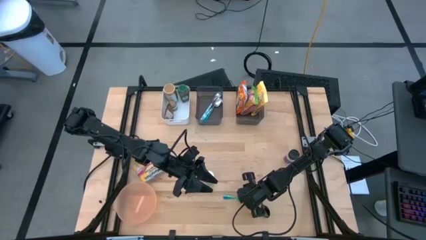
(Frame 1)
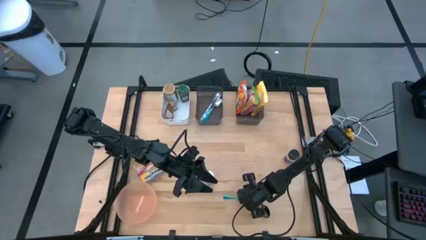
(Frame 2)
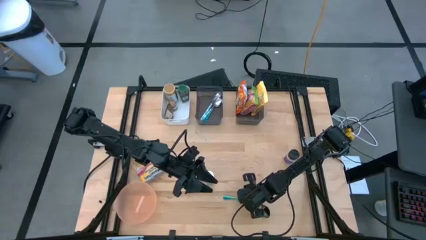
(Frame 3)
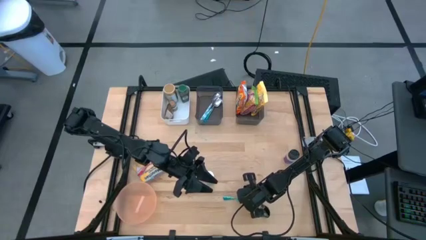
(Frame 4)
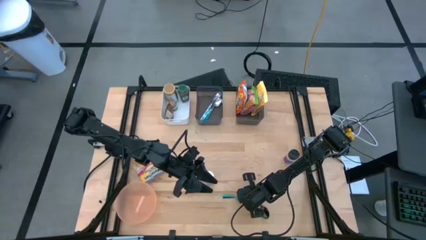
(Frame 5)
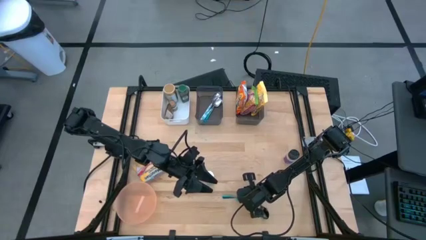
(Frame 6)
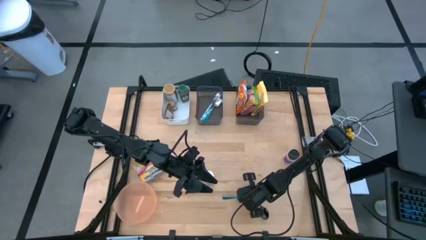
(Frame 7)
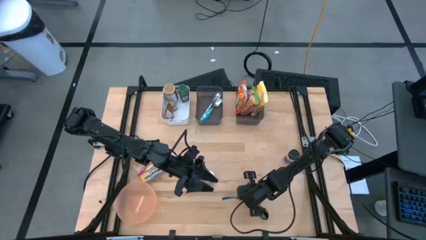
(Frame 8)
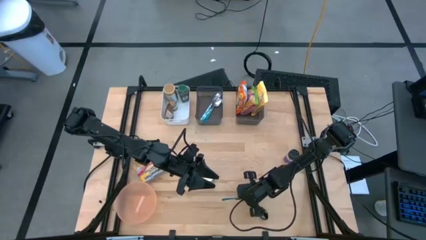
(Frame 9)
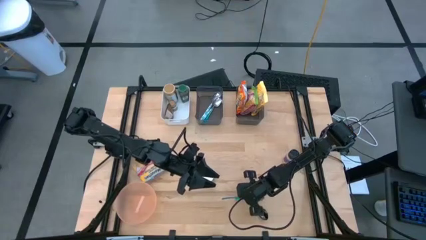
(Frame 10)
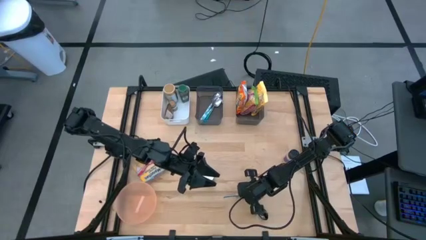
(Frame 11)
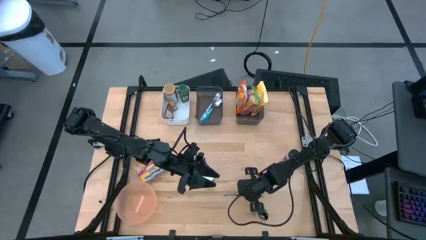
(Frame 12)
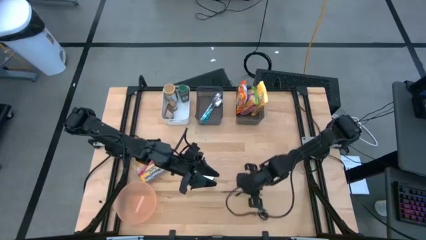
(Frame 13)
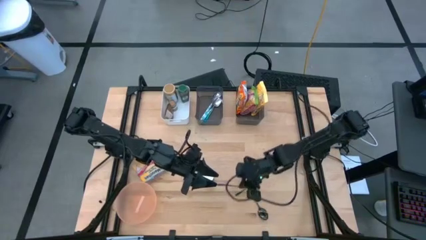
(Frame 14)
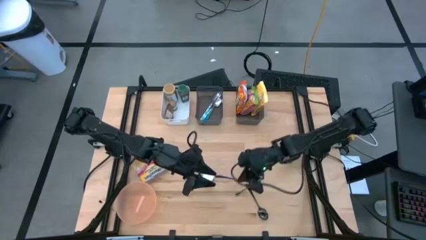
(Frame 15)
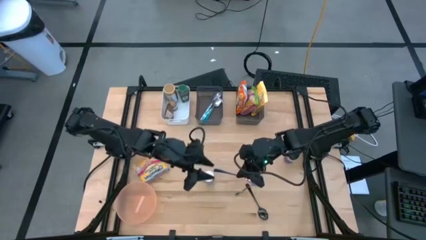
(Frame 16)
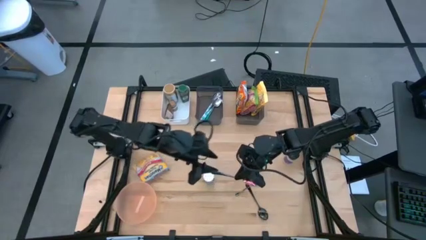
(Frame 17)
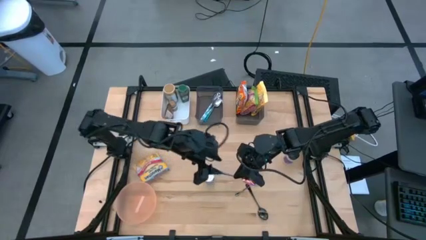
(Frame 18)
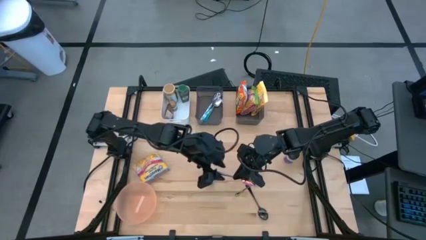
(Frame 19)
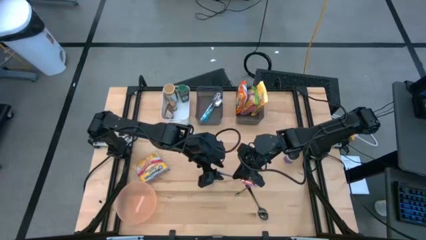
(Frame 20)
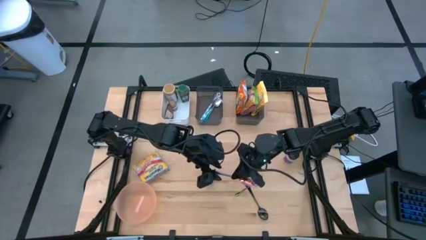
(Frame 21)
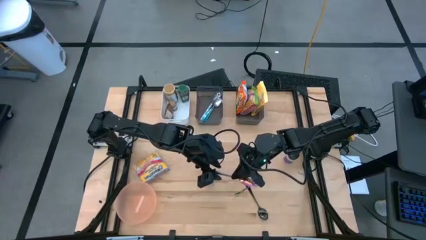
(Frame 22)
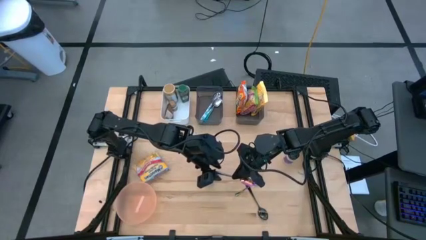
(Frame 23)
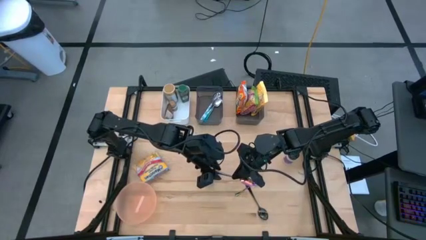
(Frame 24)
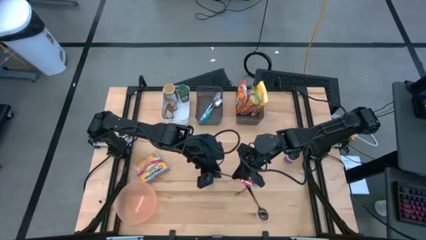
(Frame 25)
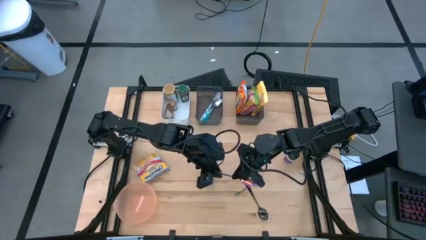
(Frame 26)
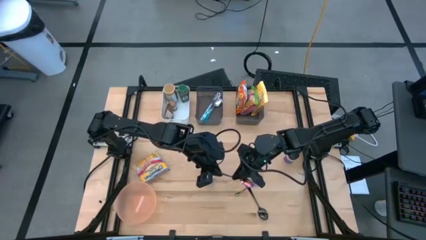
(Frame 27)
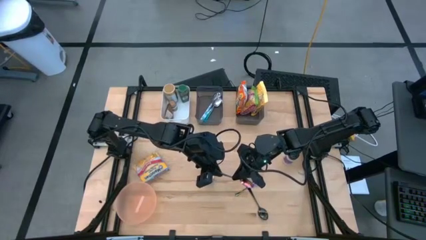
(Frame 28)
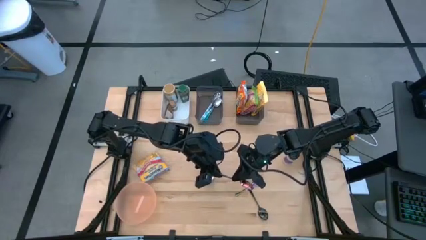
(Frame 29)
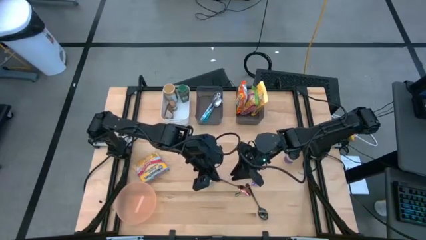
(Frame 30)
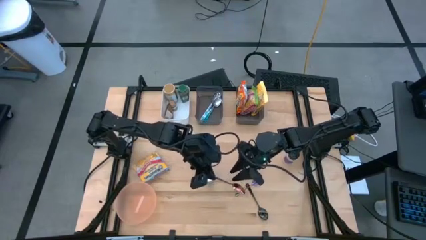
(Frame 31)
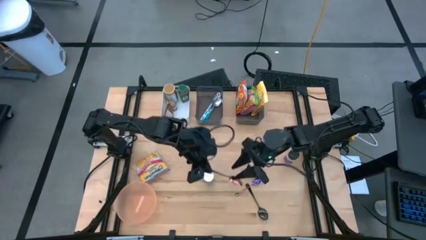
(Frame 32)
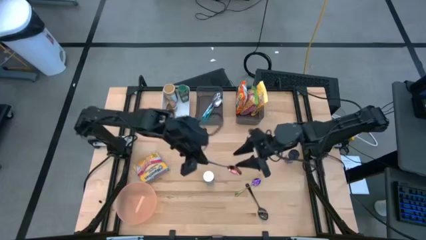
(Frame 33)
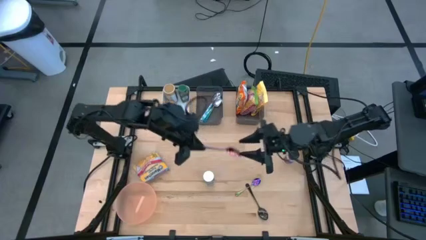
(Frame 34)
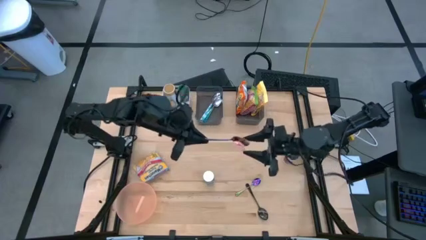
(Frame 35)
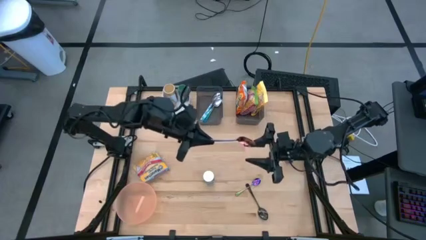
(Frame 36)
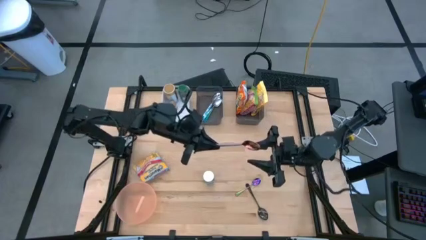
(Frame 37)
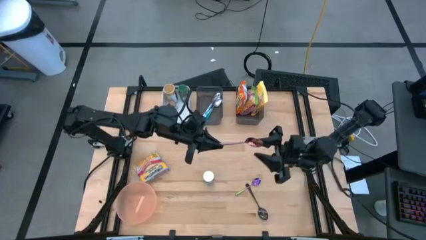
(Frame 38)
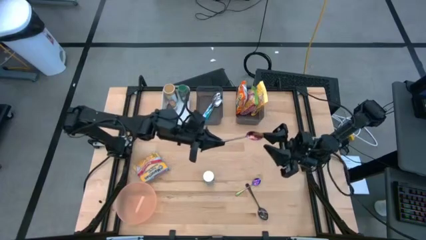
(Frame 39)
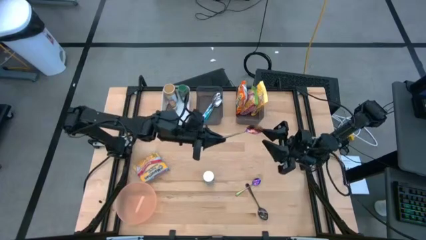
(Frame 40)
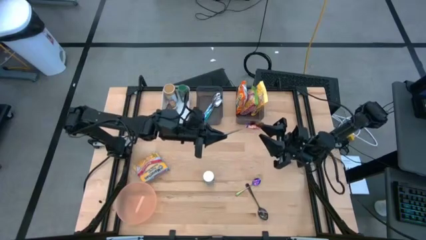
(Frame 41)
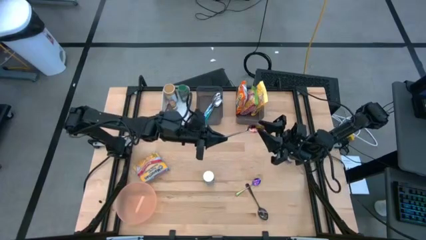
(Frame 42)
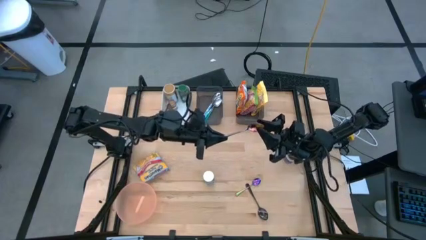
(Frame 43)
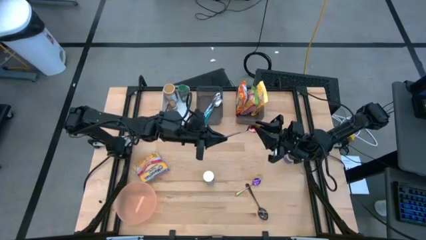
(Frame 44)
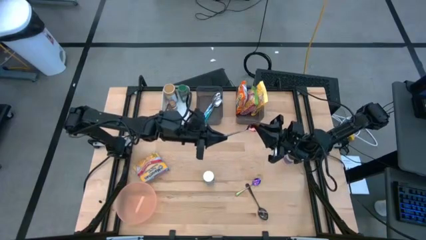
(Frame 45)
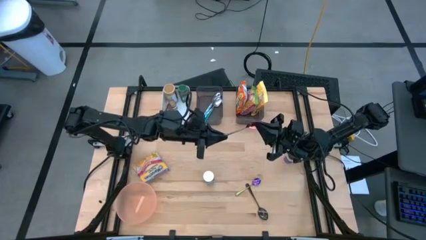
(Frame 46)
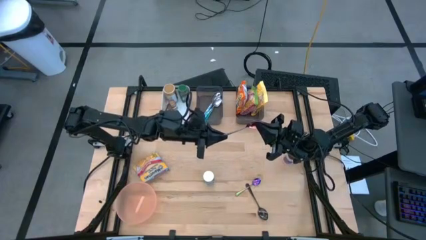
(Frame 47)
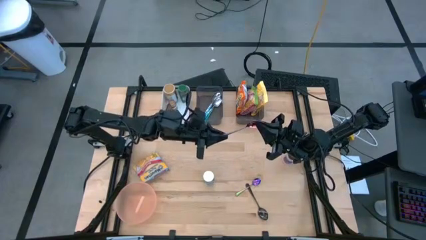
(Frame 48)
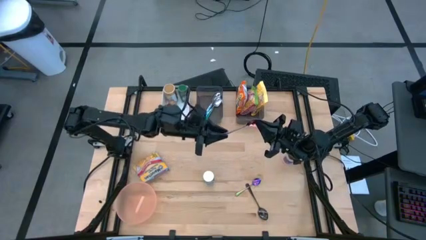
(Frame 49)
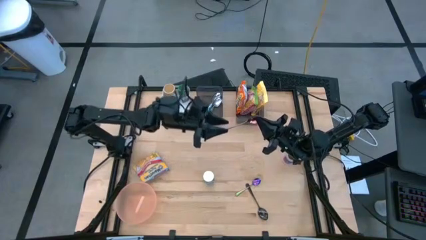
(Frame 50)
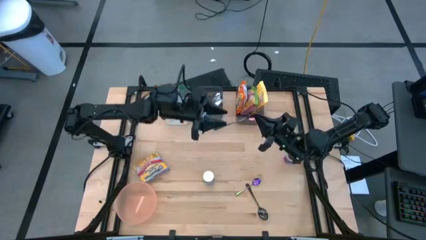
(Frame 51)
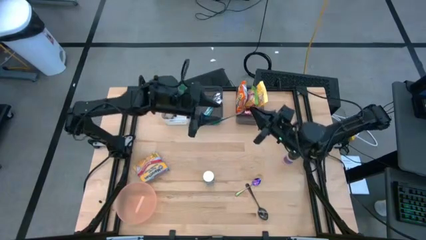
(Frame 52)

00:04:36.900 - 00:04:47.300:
Task: Pick & Place Food Item
Put the left violet spoon into the left black bin

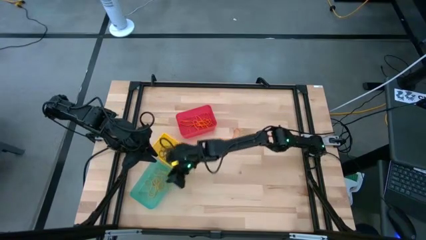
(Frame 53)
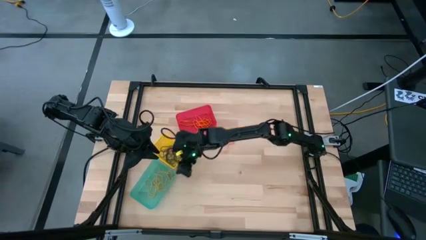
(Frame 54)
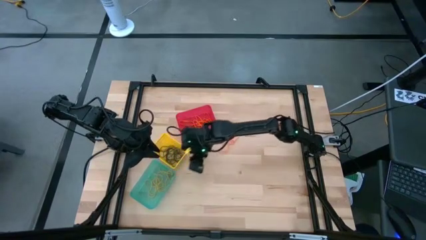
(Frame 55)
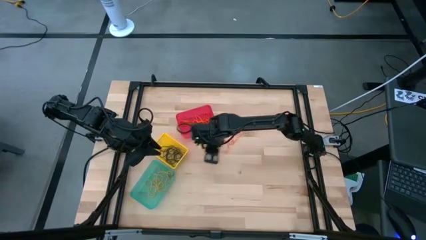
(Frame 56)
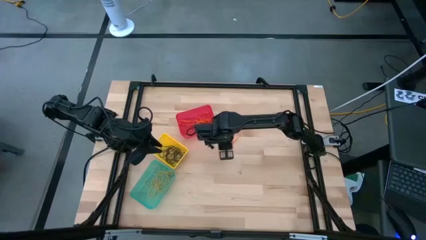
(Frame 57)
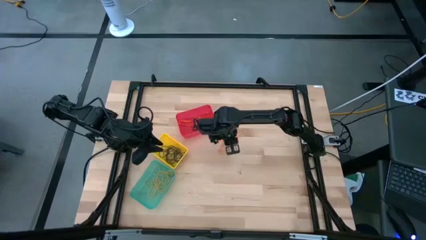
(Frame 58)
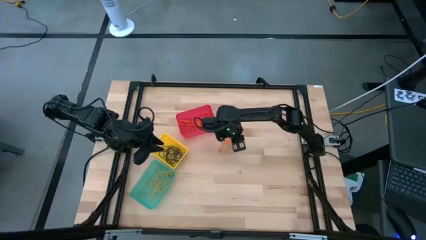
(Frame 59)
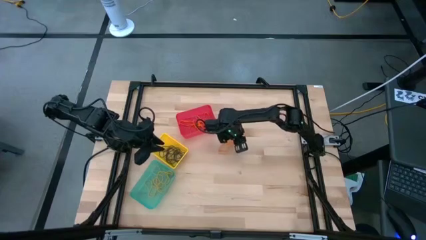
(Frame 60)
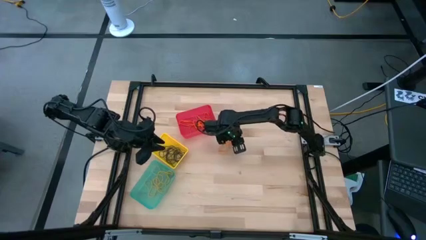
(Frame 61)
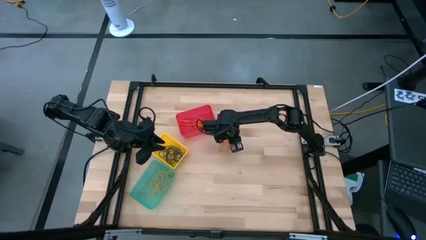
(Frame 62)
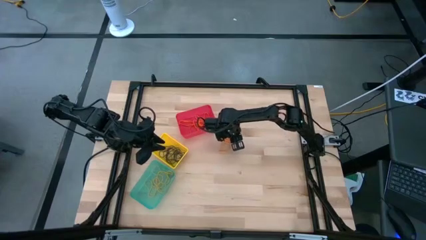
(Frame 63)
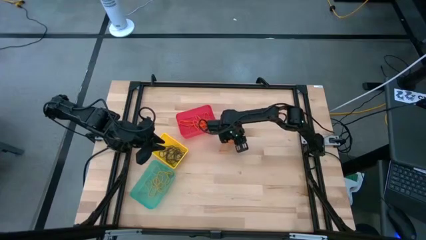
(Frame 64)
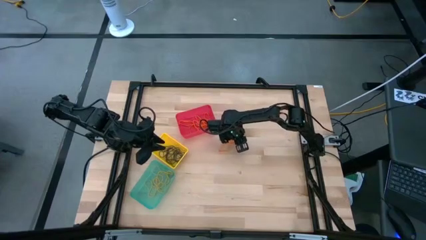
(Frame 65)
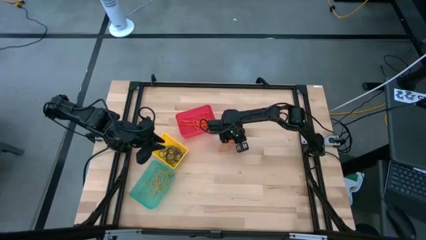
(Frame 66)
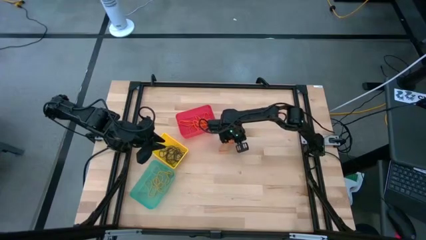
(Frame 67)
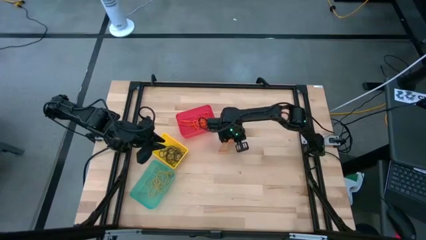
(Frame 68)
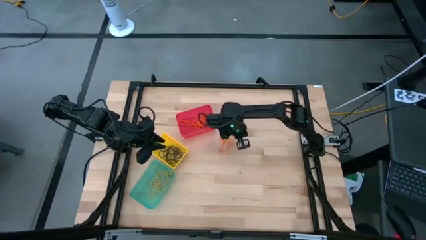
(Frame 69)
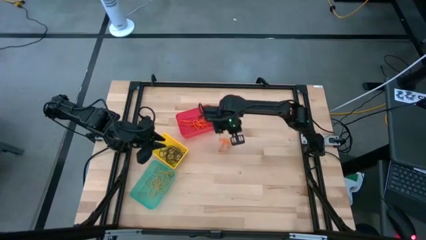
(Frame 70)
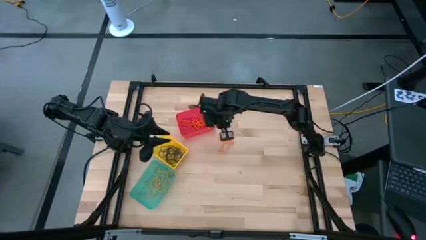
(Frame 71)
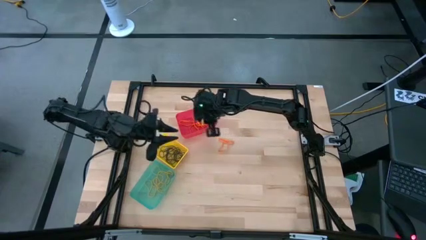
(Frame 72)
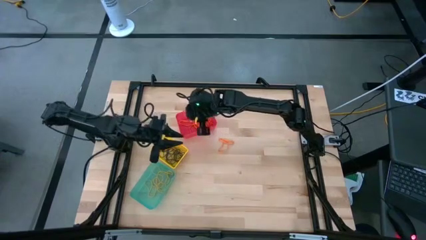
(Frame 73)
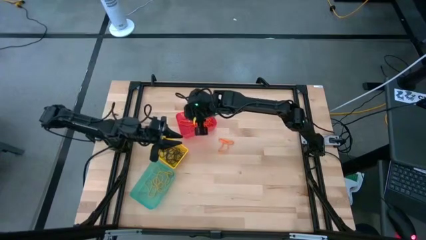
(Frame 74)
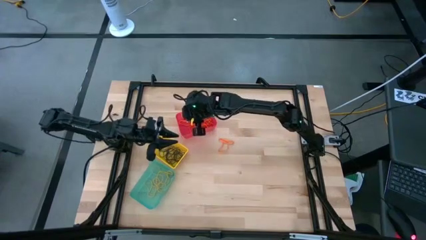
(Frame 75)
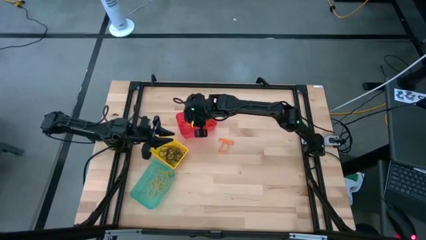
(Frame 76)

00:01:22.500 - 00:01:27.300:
Task: Sort rubber bands into baskets
Put the orange rubber band into the red bin

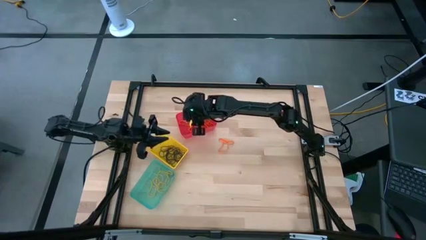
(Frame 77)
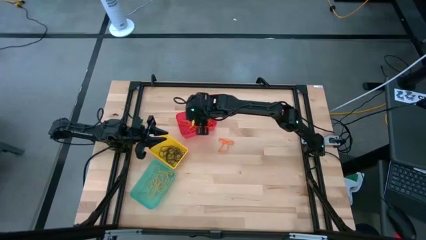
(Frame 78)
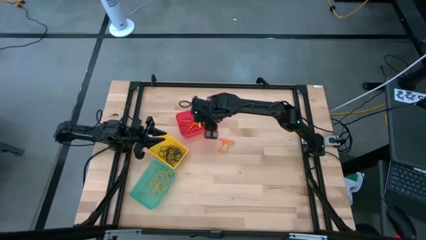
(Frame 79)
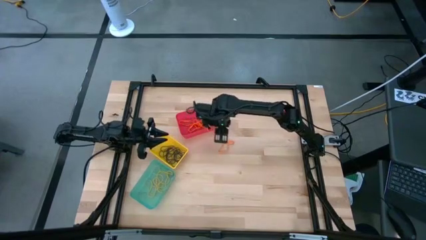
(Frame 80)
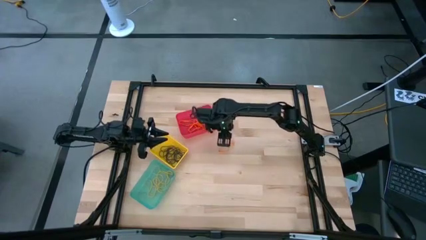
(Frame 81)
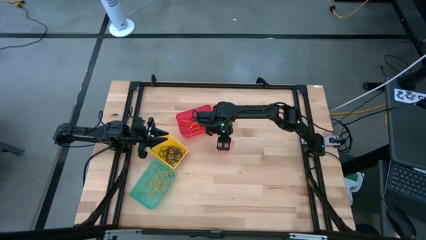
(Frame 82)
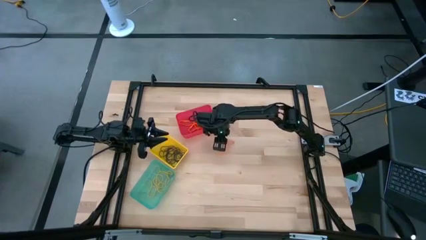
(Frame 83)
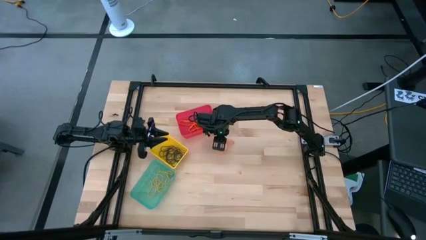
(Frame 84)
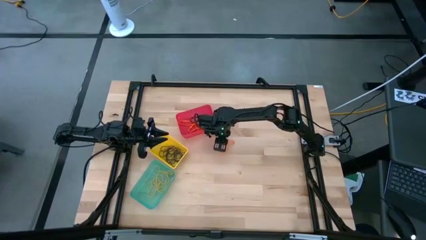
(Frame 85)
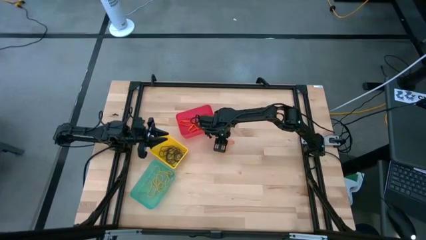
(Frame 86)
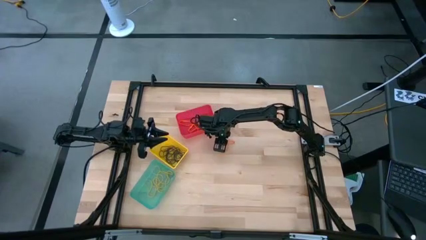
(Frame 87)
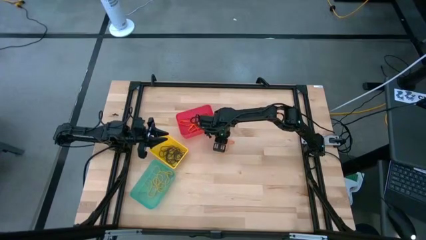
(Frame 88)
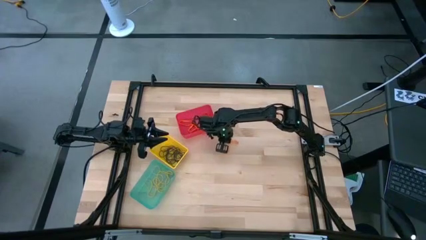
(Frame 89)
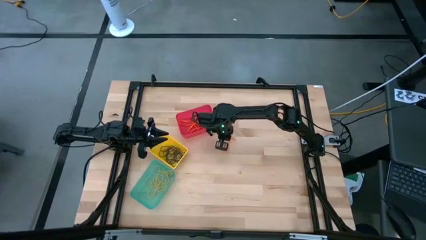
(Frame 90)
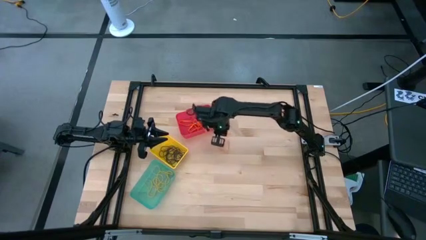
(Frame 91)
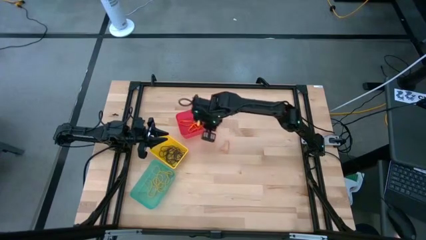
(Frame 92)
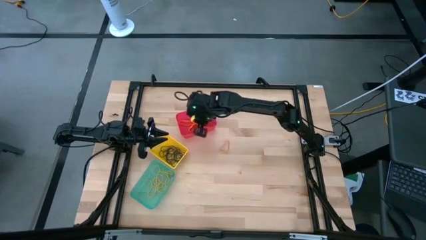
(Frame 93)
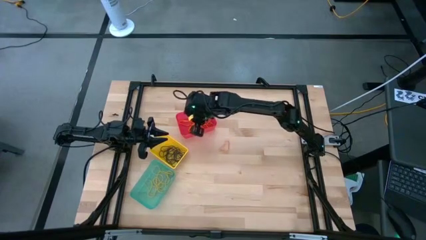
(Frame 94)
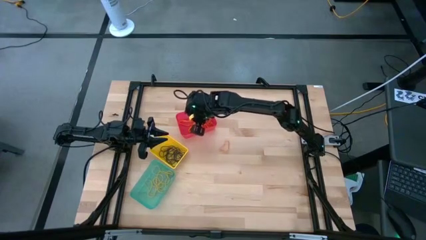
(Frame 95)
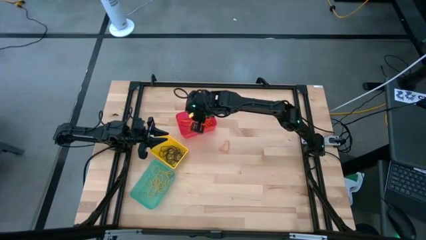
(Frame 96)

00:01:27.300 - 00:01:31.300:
Put the orange rubber band into the red bin
